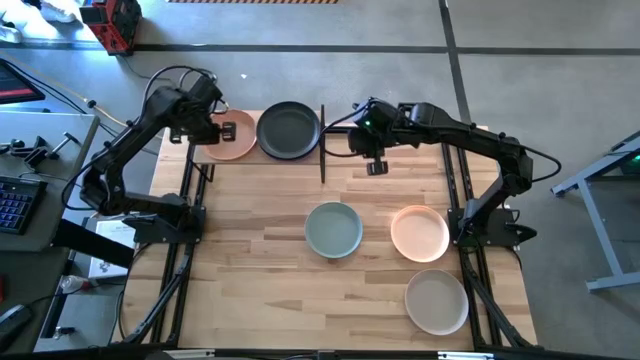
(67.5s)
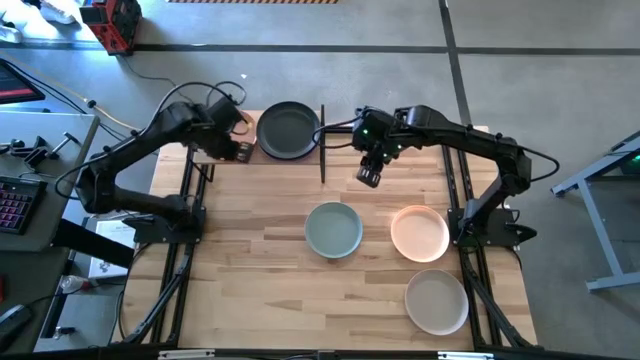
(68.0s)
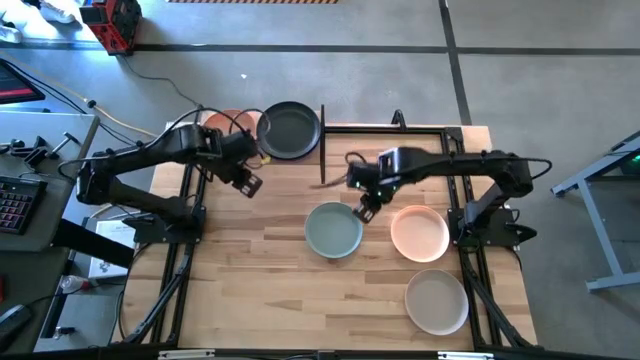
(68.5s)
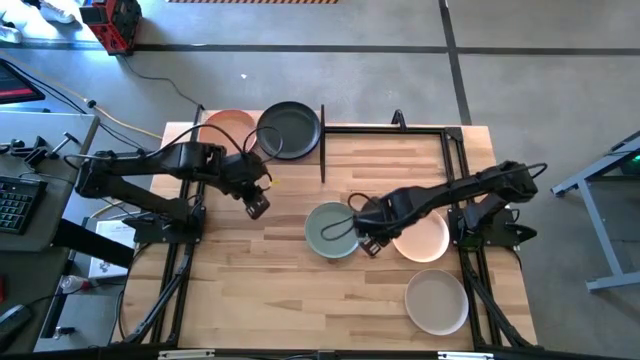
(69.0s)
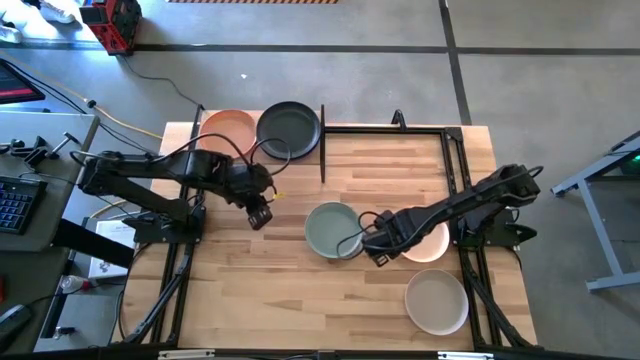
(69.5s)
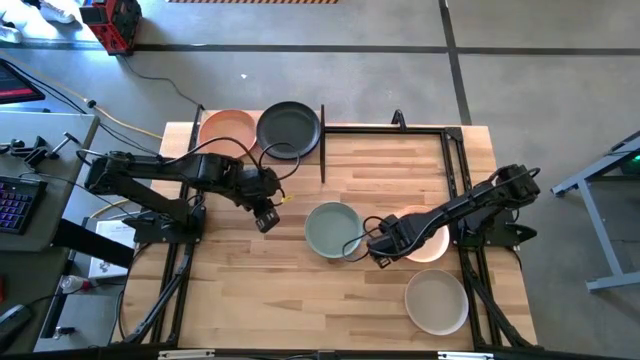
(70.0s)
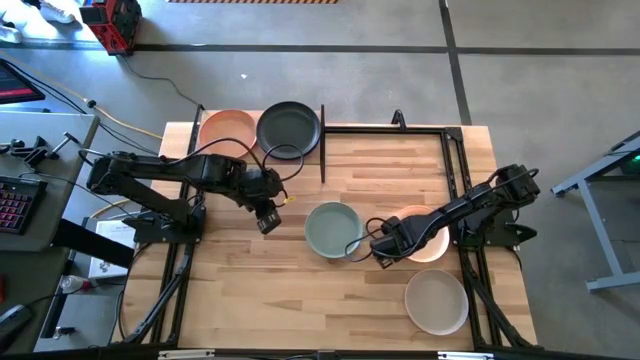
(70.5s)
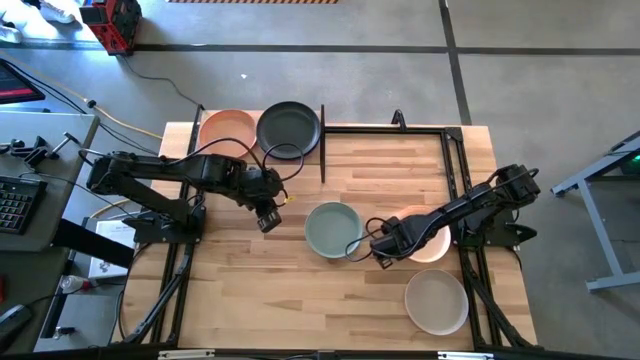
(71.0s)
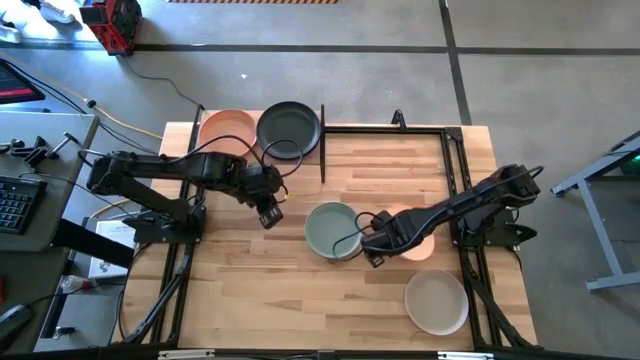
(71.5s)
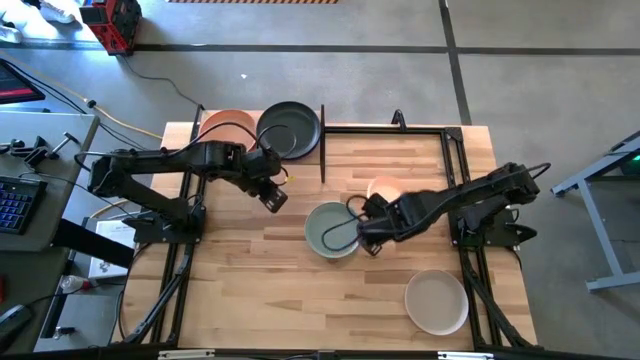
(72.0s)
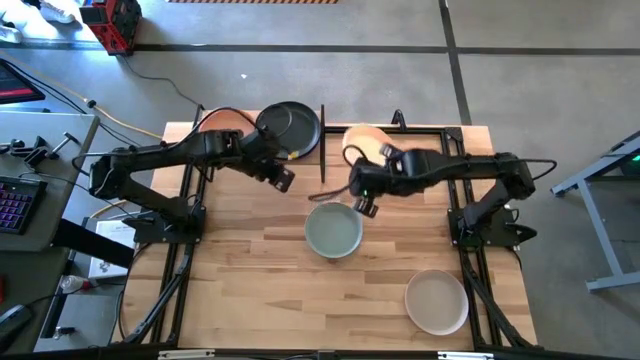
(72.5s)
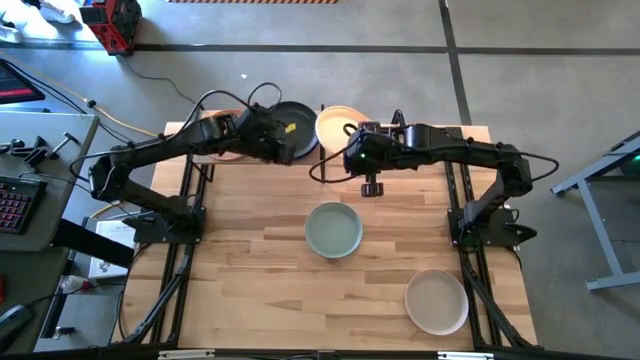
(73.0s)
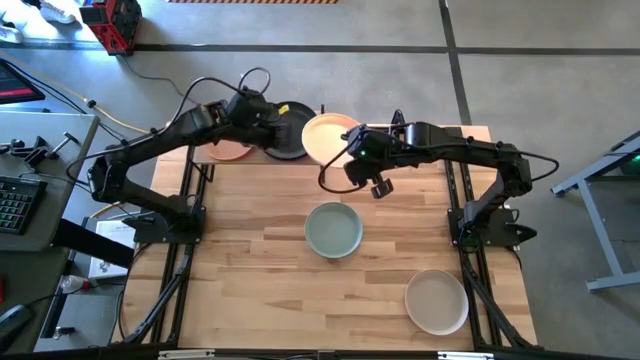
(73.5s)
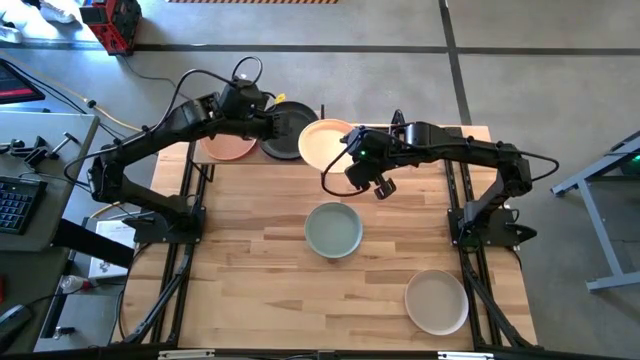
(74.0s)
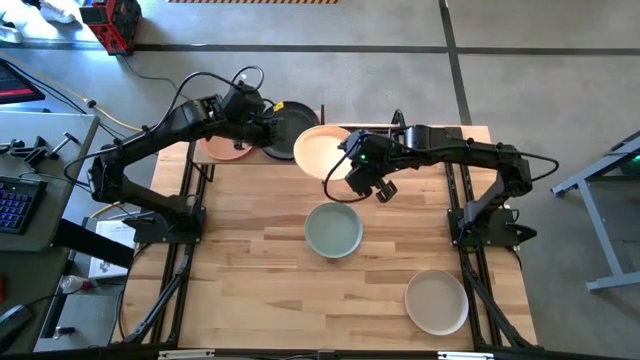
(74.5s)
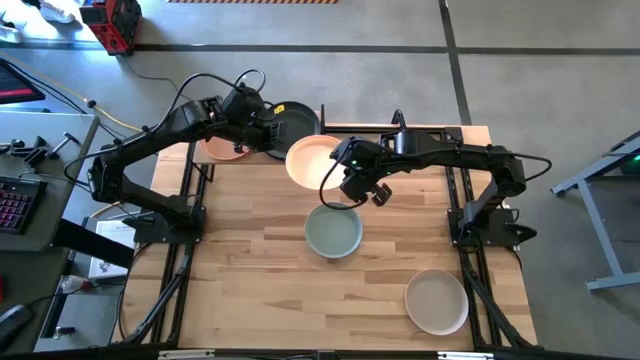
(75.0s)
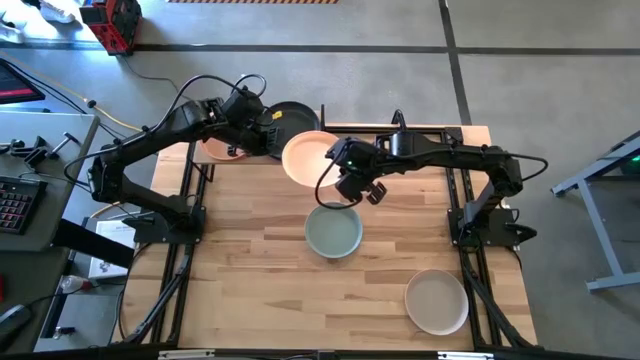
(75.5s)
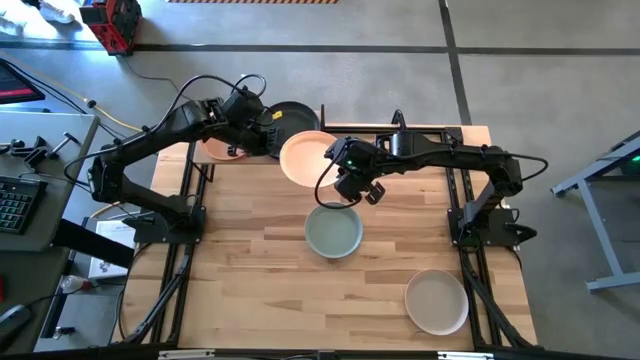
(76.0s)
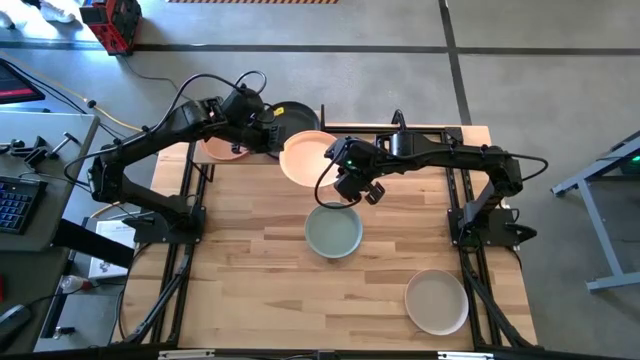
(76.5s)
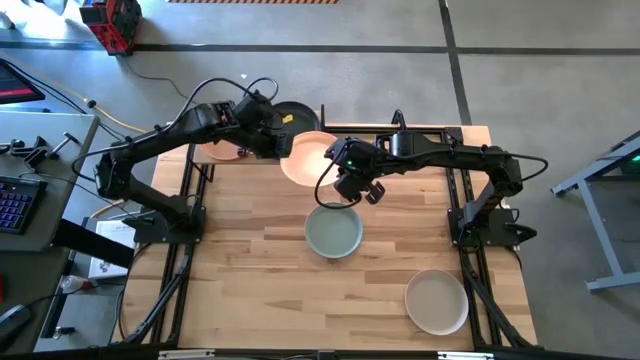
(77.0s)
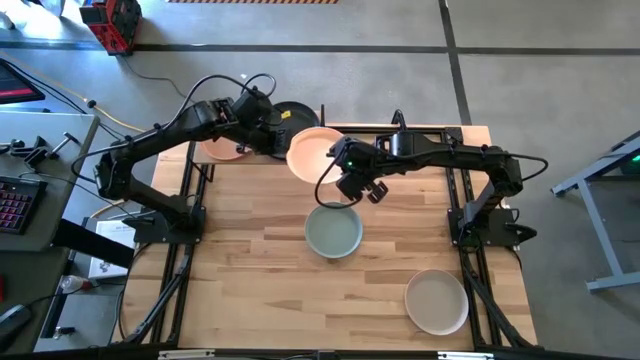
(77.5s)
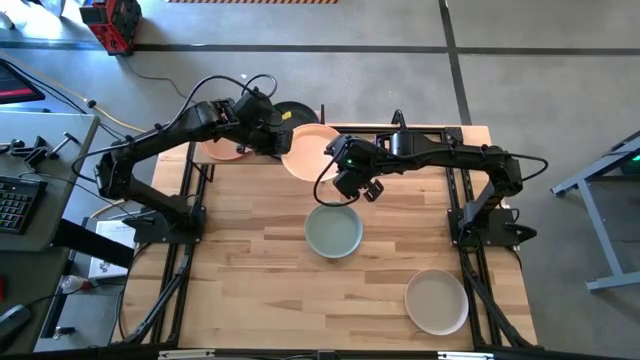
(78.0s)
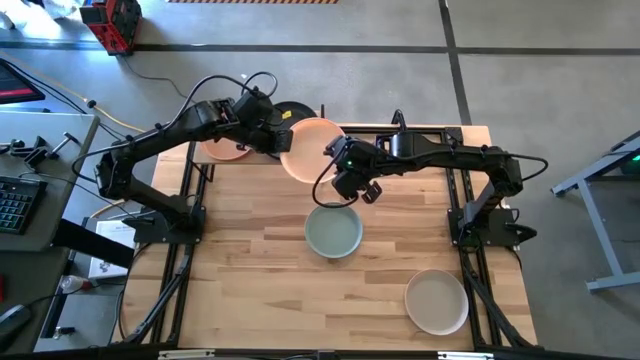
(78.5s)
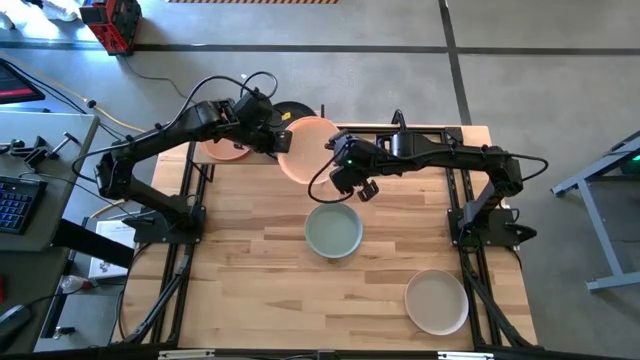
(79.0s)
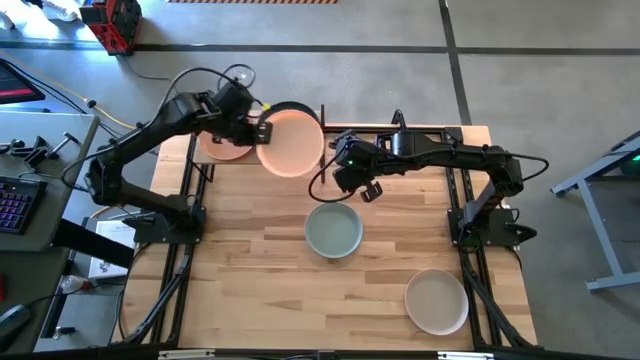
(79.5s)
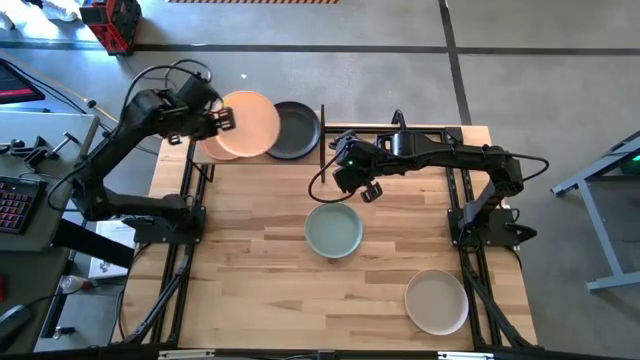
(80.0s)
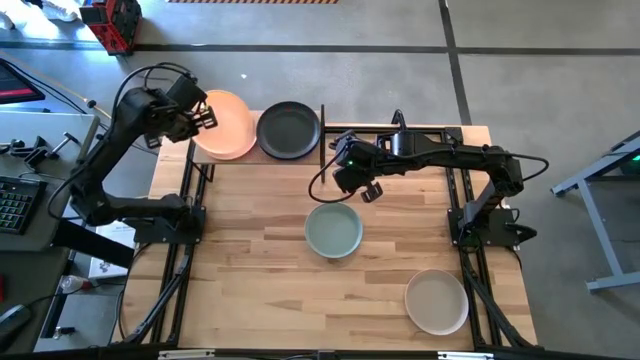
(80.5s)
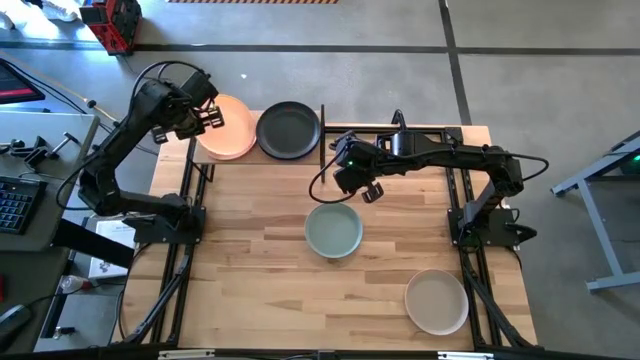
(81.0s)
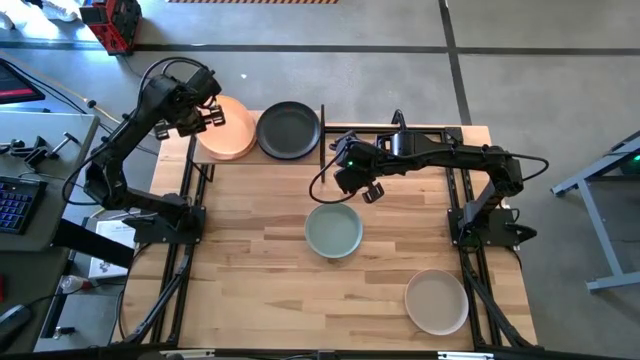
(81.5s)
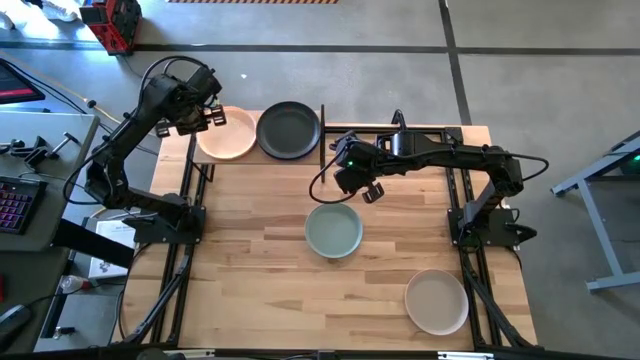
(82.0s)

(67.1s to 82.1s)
Task: Place and stack plates onto a shelf
Stack the light orange plate on top of the orange plate on the shelf

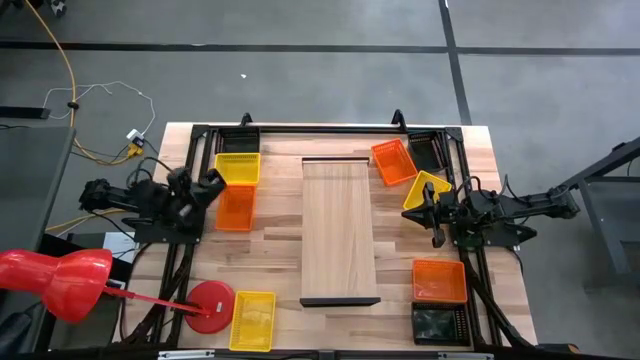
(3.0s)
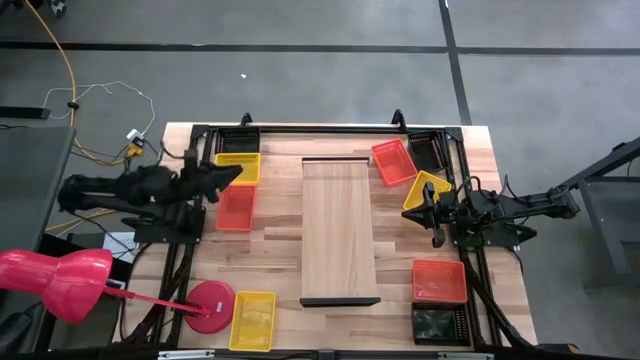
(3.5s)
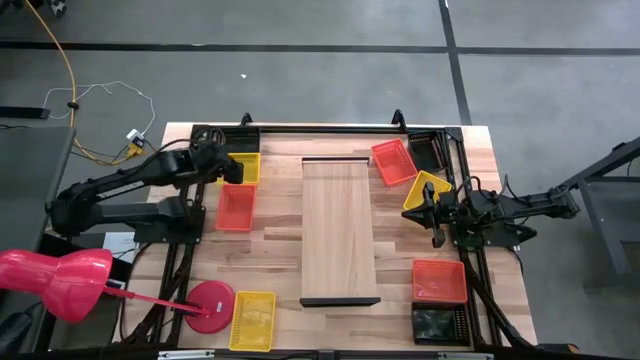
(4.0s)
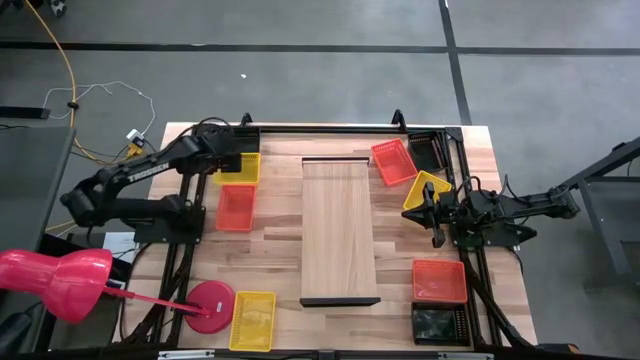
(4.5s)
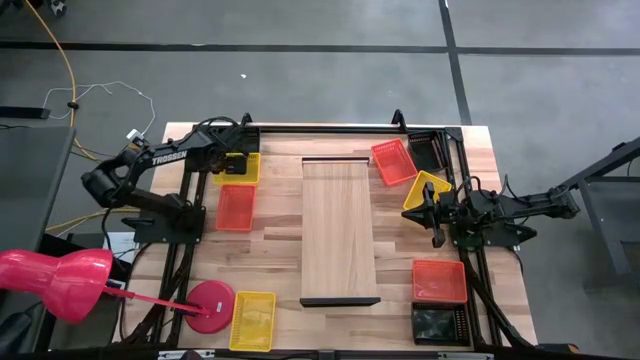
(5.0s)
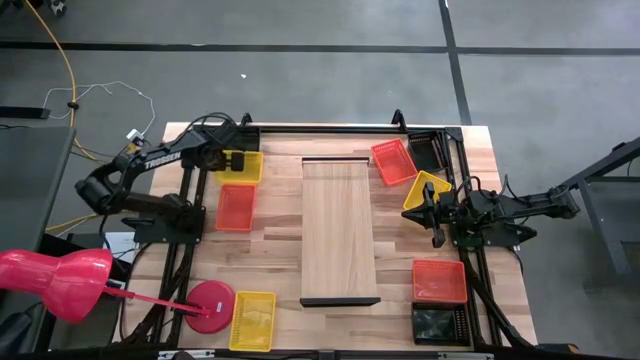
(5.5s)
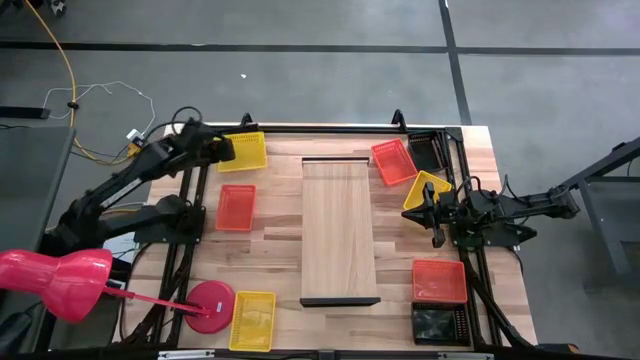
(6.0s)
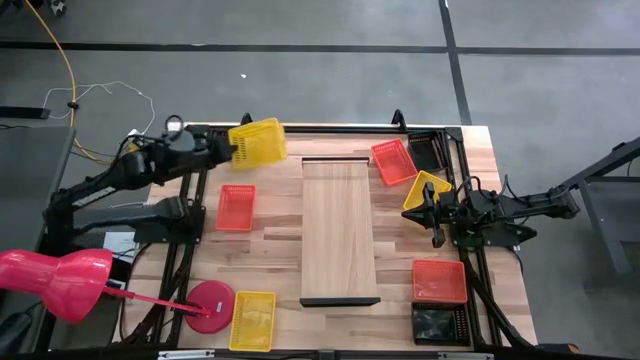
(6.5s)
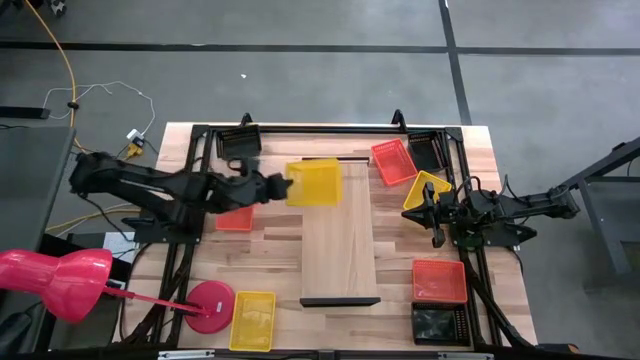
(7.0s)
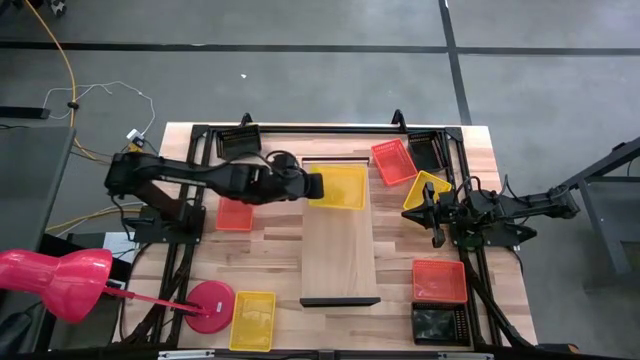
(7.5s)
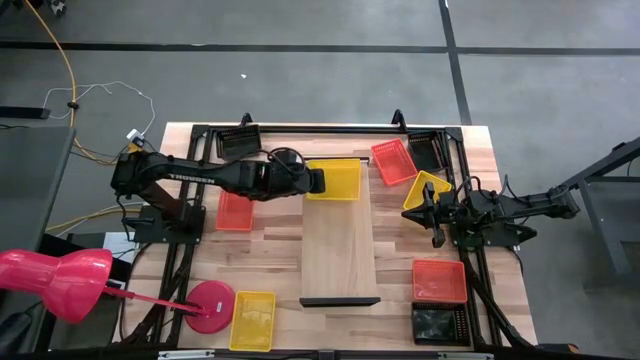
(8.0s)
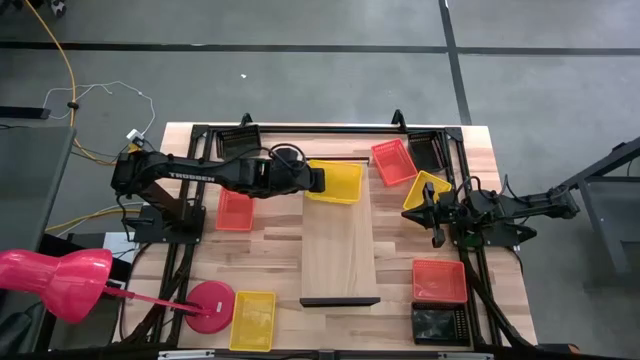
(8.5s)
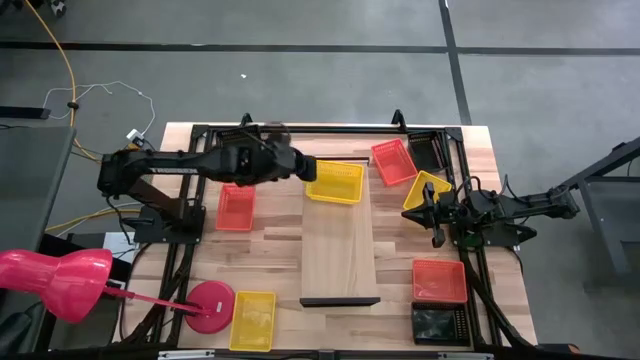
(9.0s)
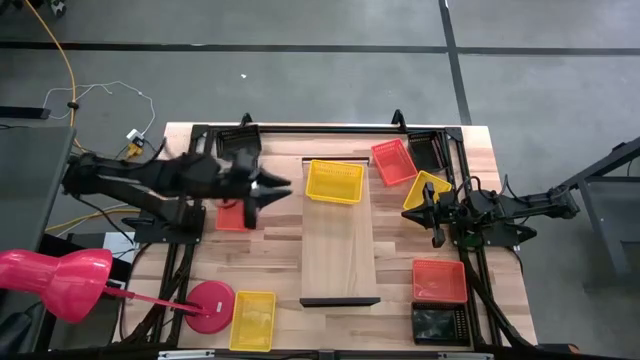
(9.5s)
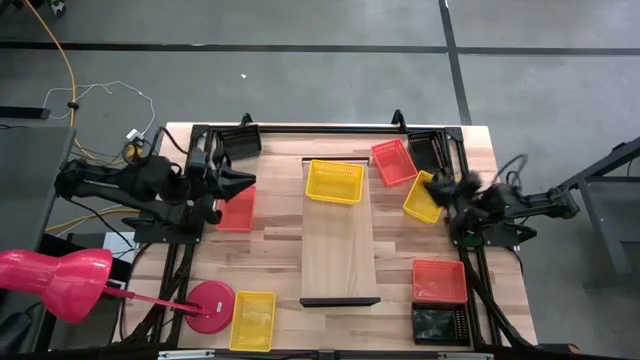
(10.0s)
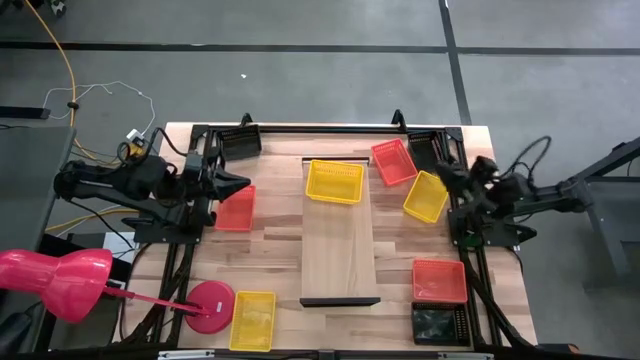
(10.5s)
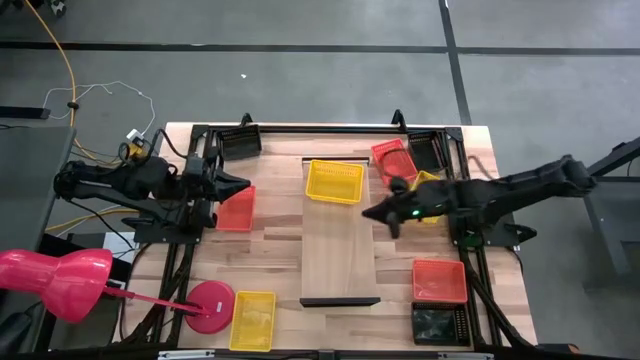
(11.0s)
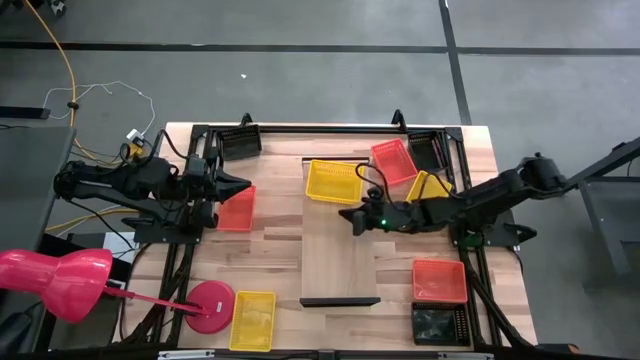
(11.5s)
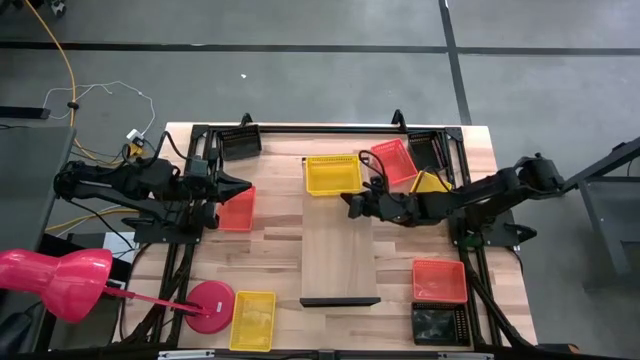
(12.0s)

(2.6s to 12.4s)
Task: Stack baskets on shelf by color
Put the top left yellow bin on the shelf
